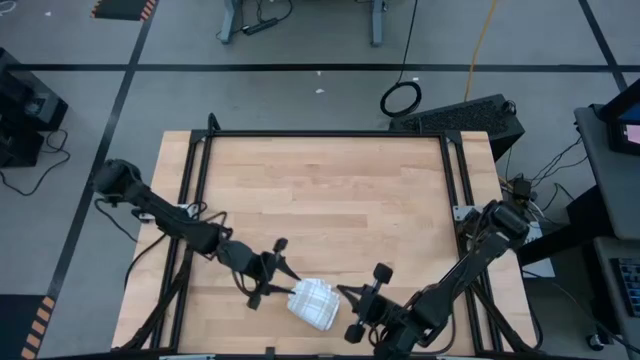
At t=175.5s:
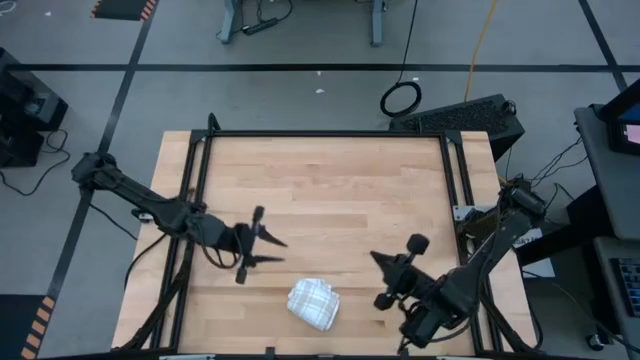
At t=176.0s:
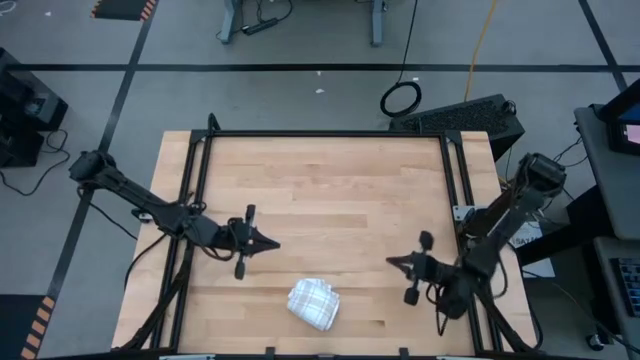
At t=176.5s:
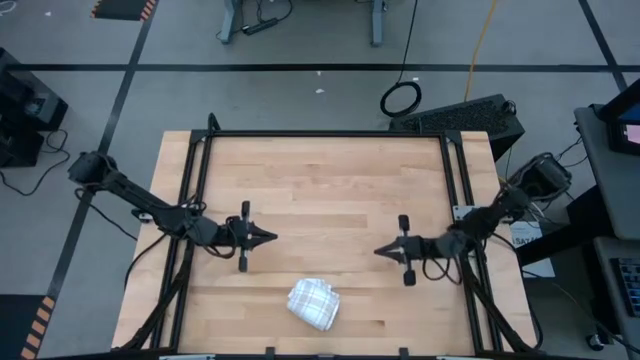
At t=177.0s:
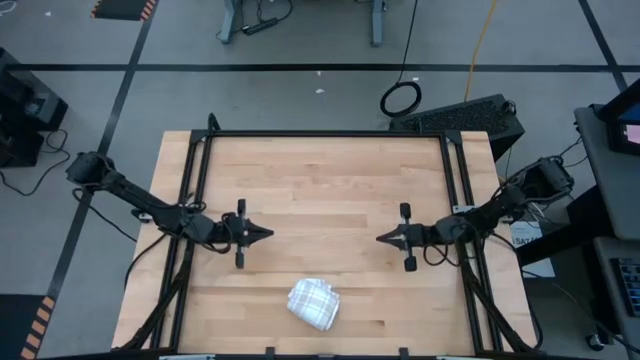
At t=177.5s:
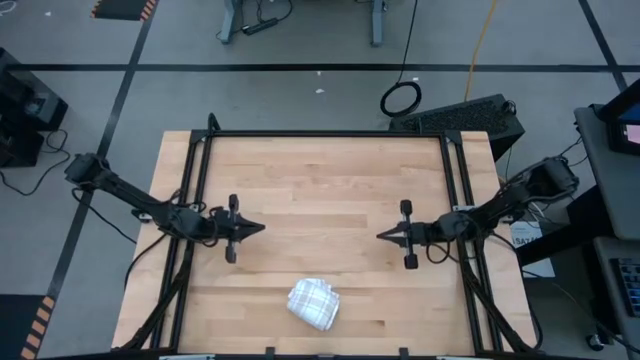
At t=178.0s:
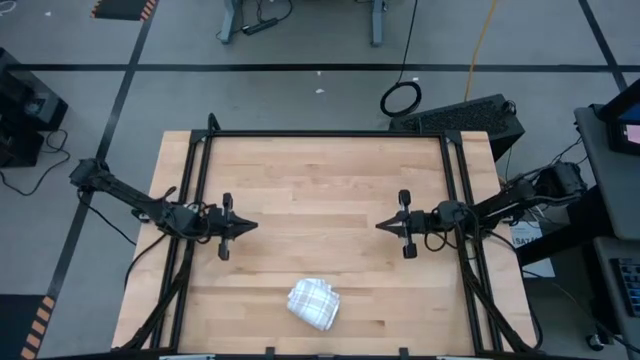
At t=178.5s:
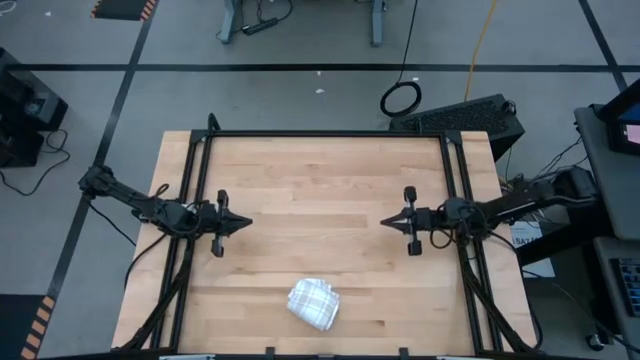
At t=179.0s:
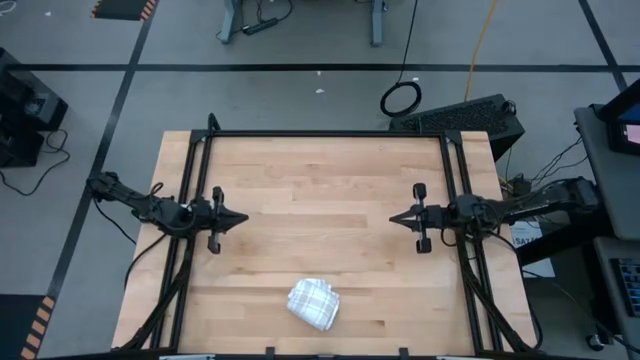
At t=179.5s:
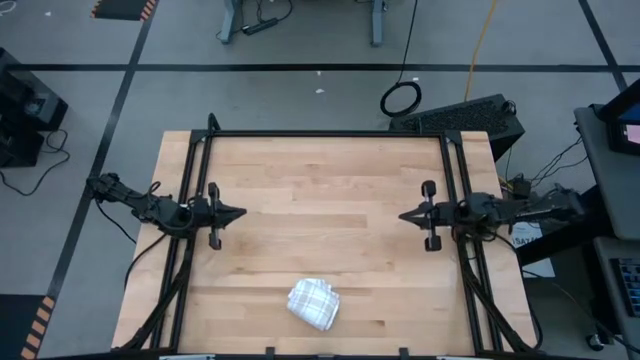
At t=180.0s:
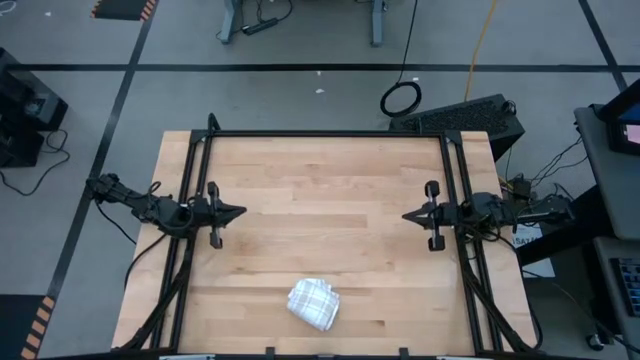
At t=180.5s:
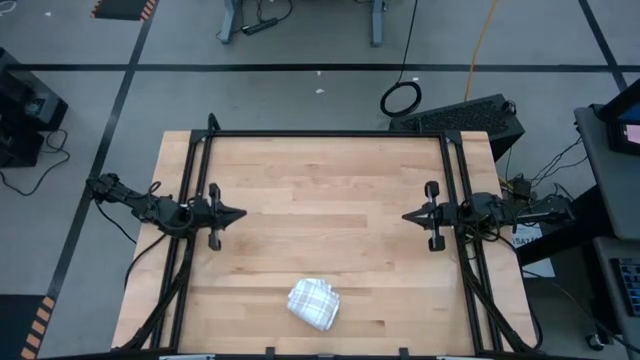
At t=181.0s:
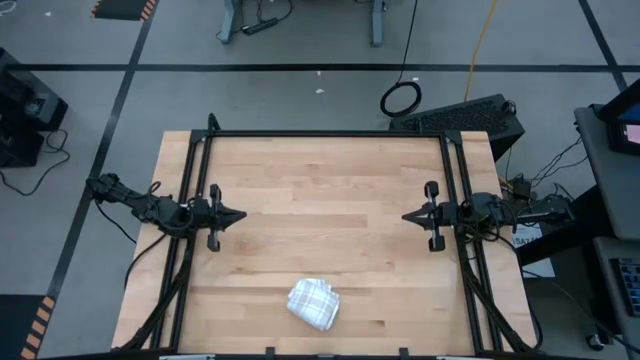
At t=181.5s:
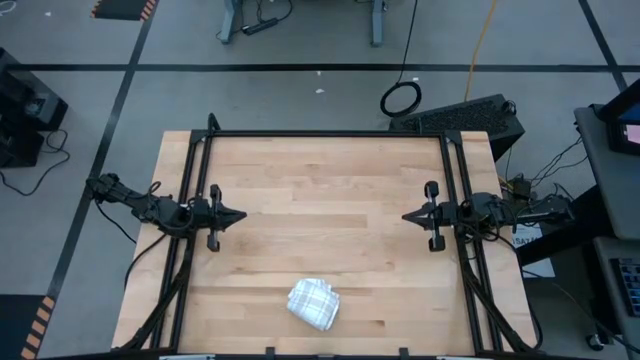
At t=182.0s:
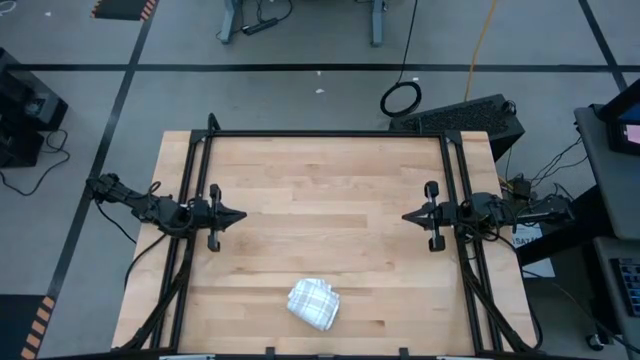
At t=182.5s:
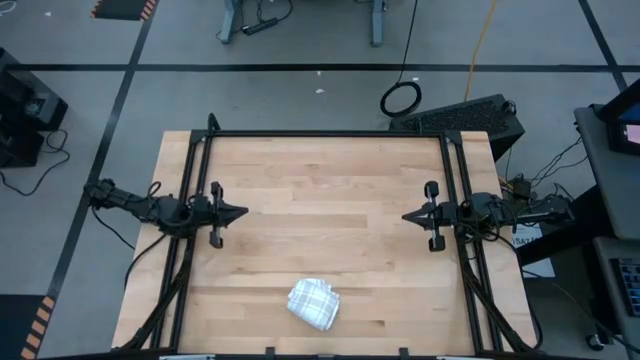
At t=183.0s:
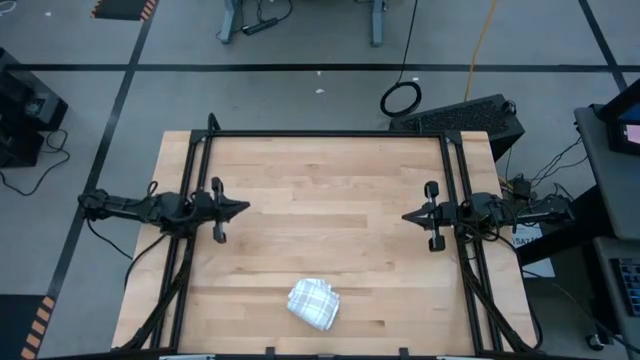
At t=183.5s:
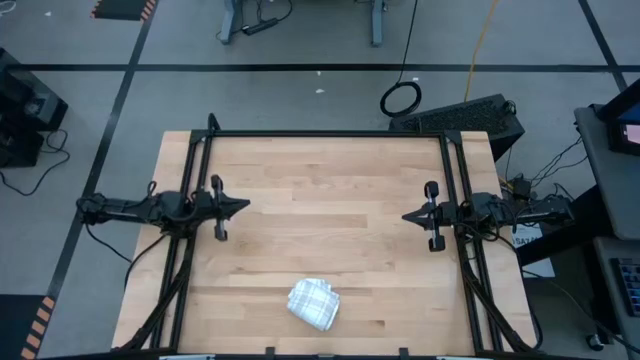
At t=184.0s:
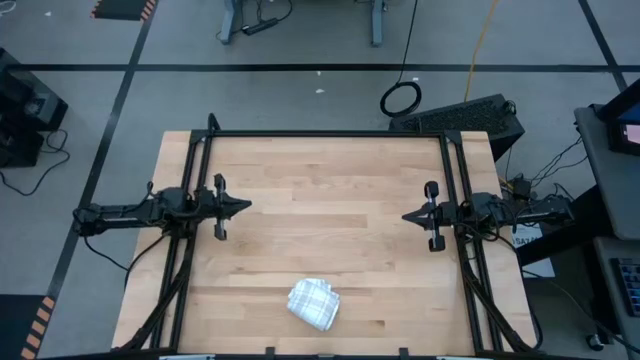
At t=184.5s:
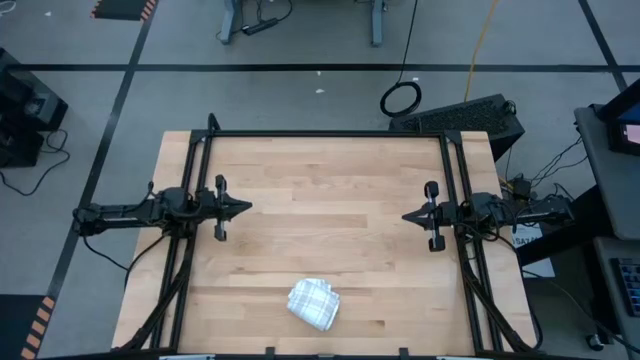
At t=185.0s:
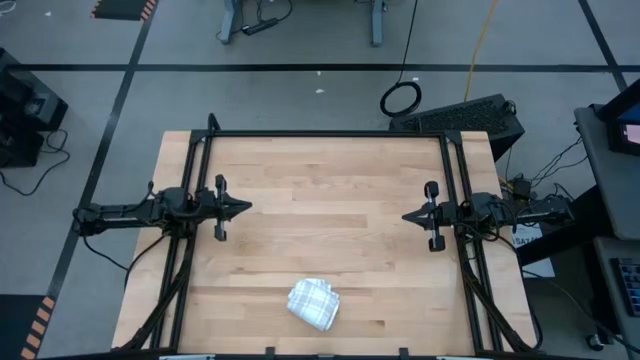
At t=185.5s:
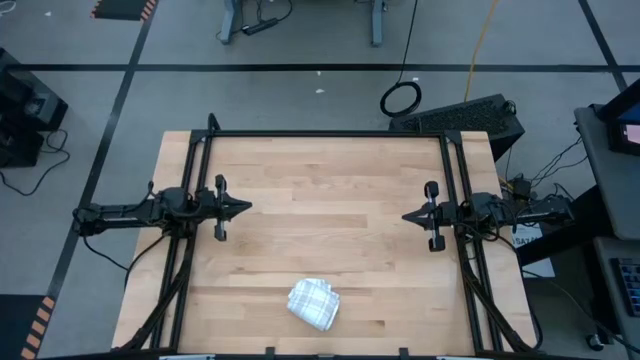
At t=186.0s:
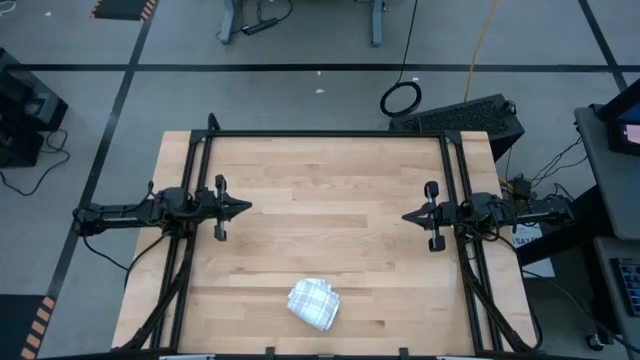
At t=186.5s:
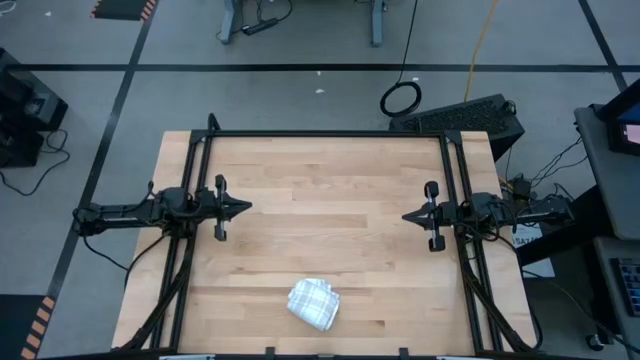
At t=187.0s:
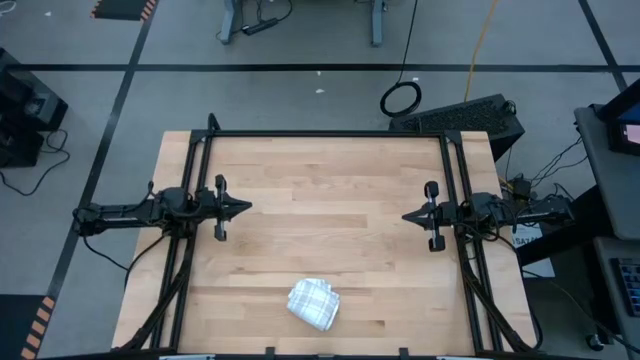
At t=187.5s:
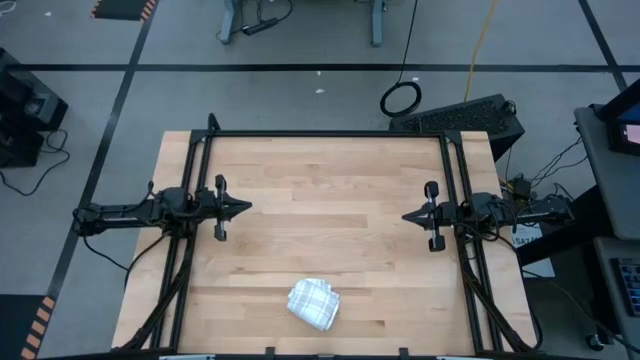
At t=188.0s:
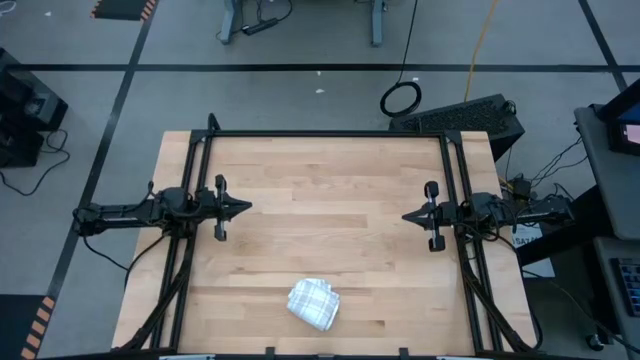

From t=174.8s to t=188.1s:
Task: Roll towel
Return to Home Position

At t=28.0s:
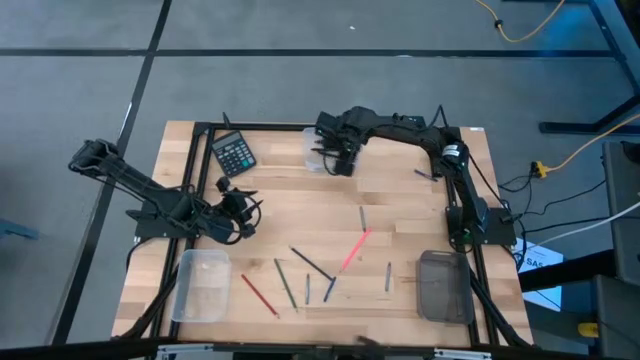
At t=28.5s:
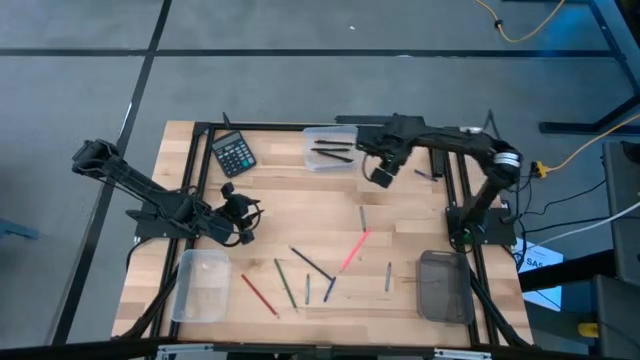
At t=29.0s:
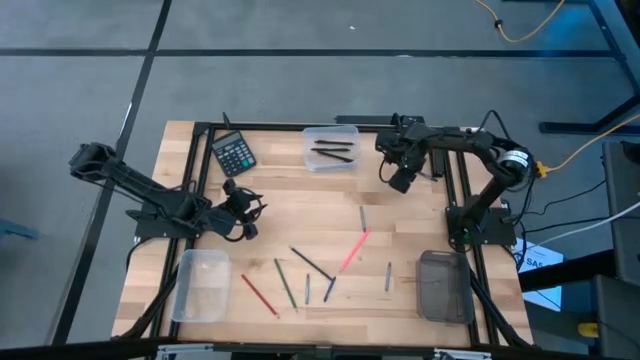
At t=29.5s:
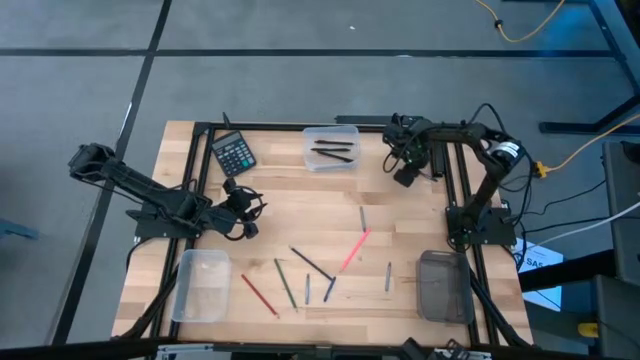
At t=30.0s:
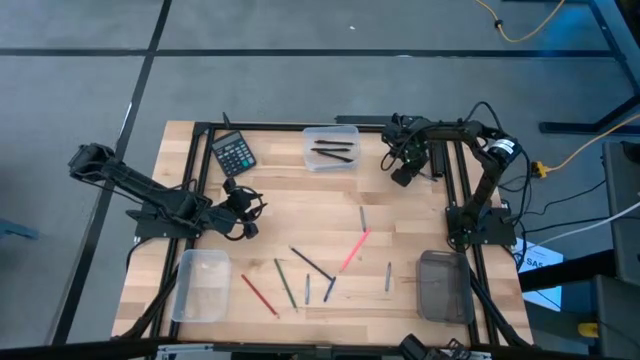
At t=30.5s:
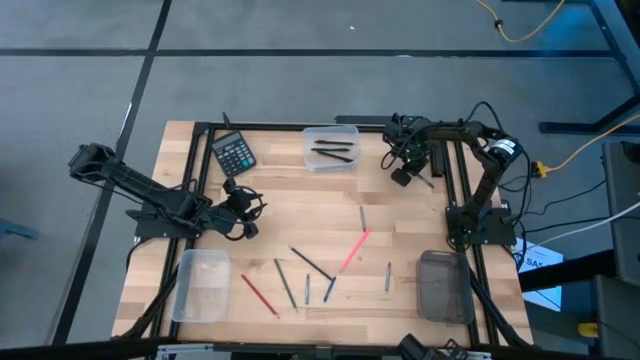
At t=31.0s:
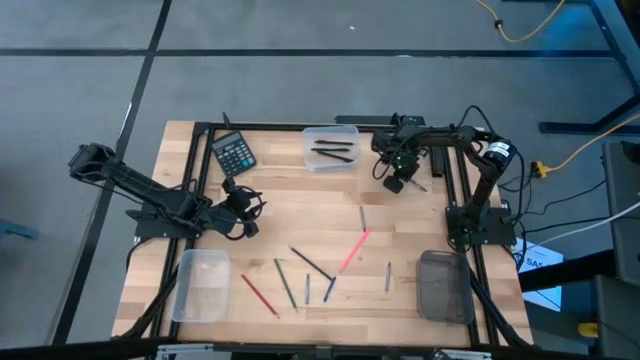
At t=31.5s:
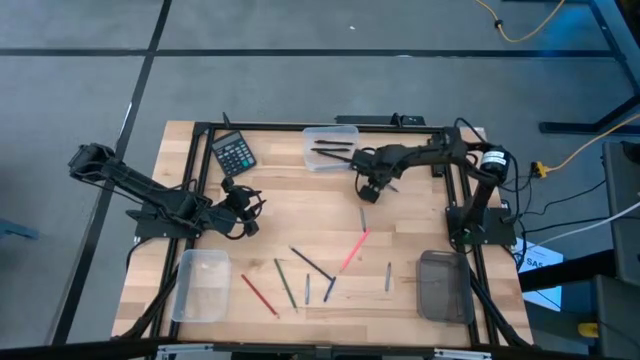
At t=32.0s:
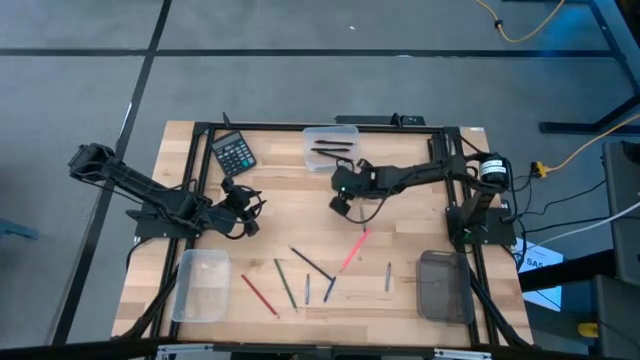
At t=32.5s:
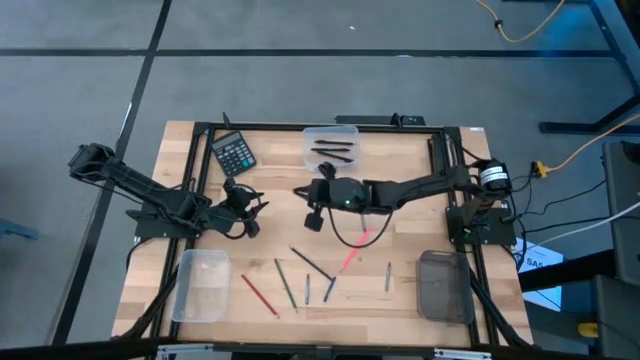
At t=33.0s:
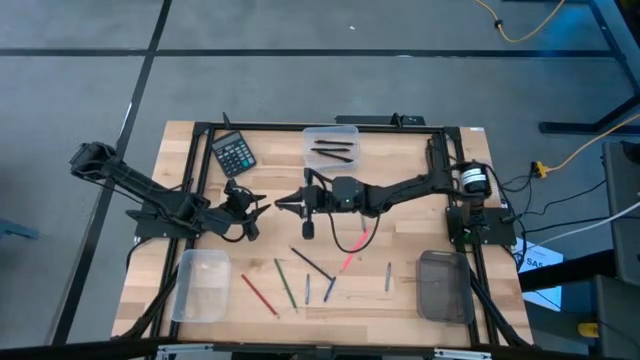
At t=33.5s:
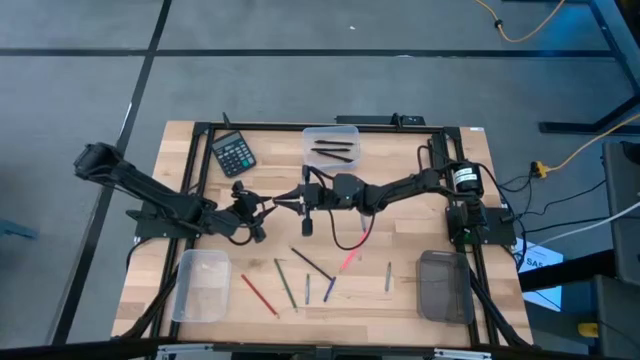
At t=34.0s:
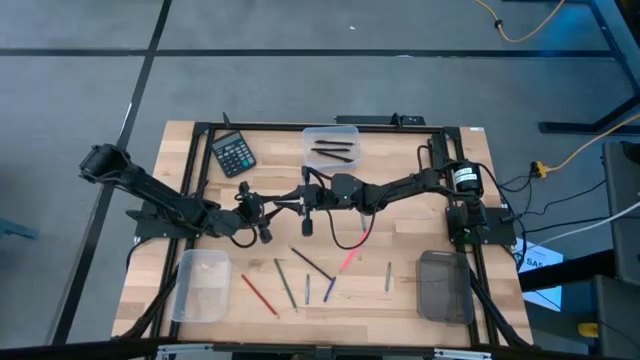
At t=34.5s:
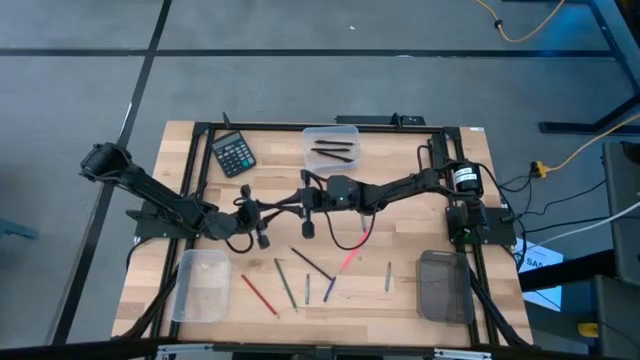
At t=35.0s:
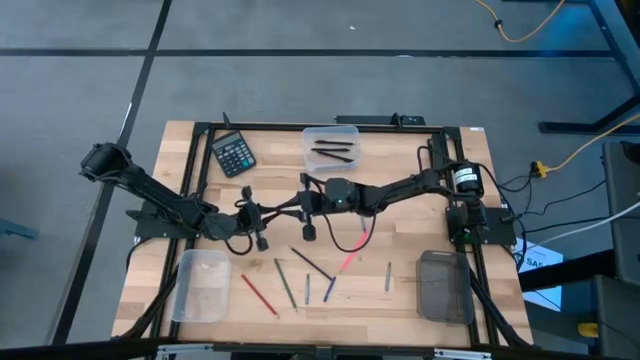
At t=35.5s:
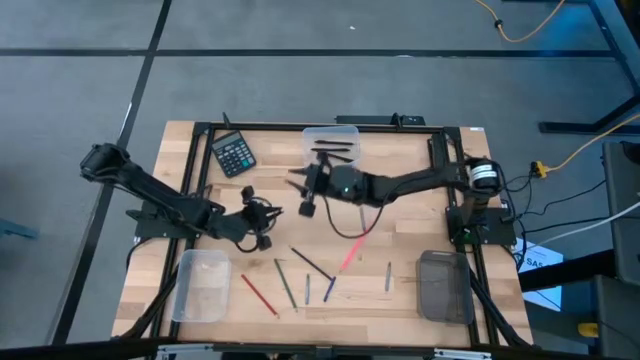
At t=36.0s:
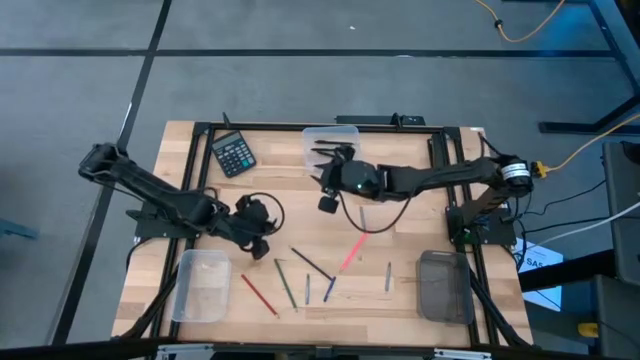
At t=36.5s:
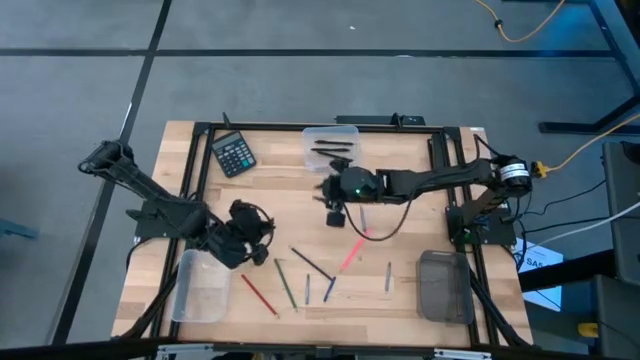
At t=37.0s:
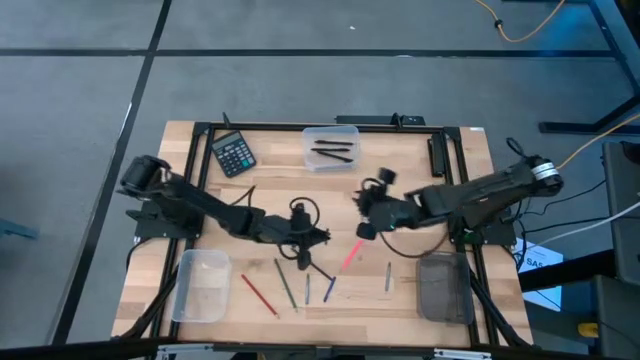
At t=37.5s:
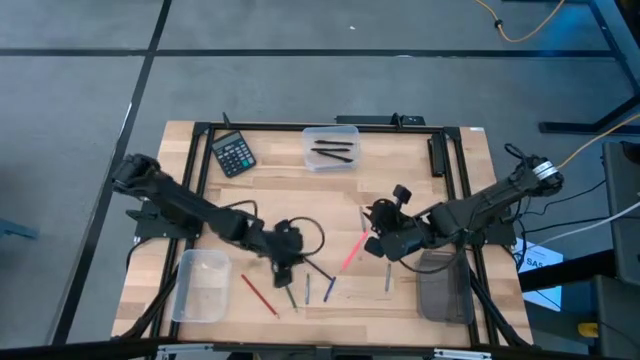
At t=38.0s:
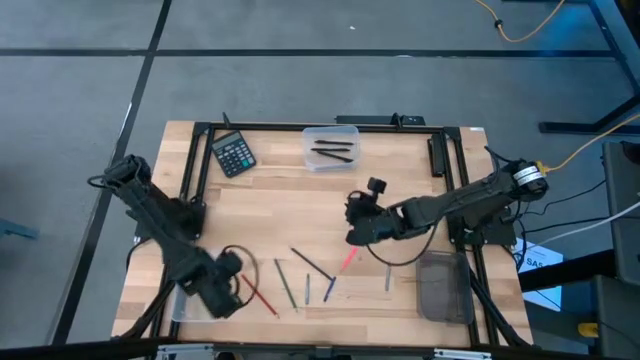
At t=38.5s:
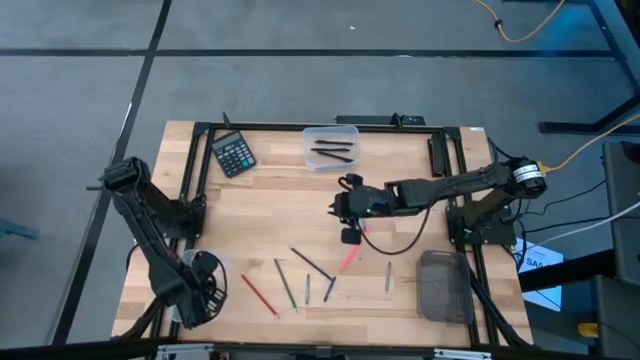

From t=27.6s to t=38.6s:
Task: Sort crayons/erasers/pens/pencils in bins
Put the top blue crayon into the bottom transparent bin
